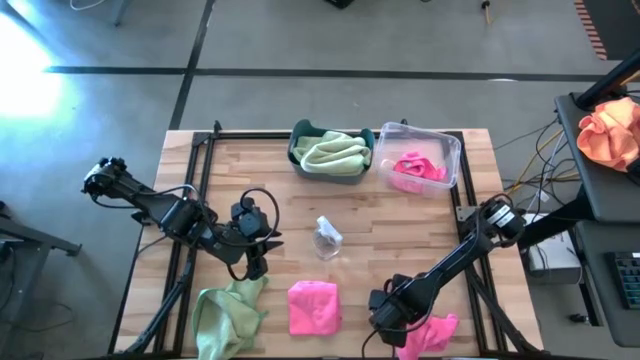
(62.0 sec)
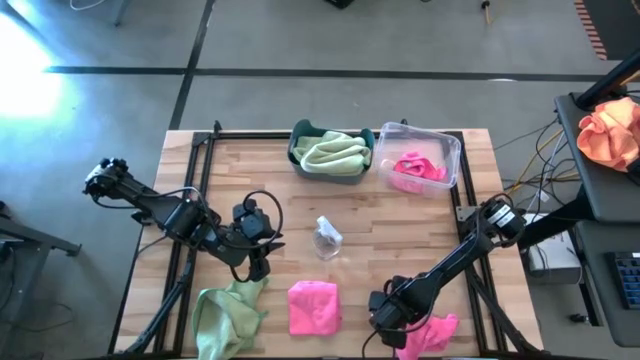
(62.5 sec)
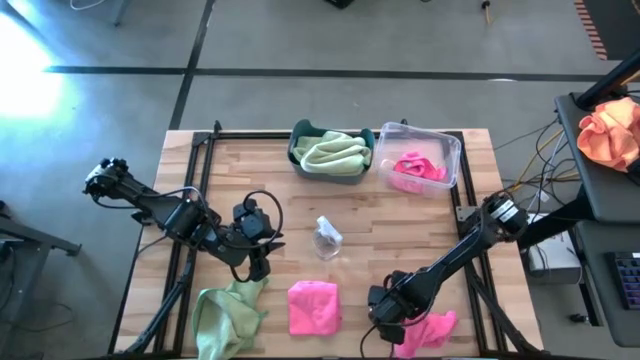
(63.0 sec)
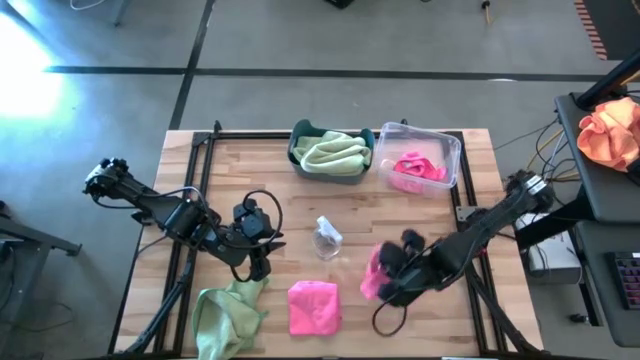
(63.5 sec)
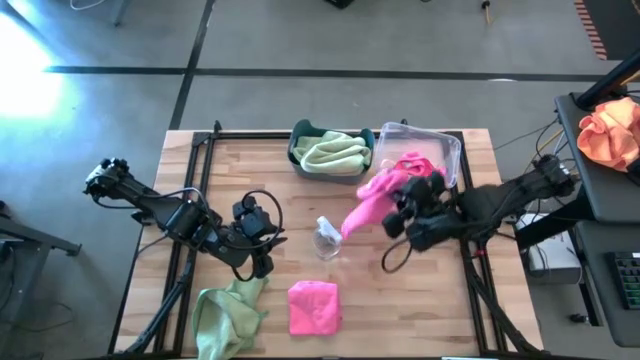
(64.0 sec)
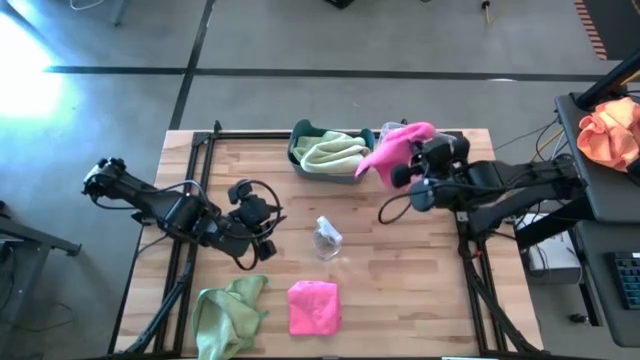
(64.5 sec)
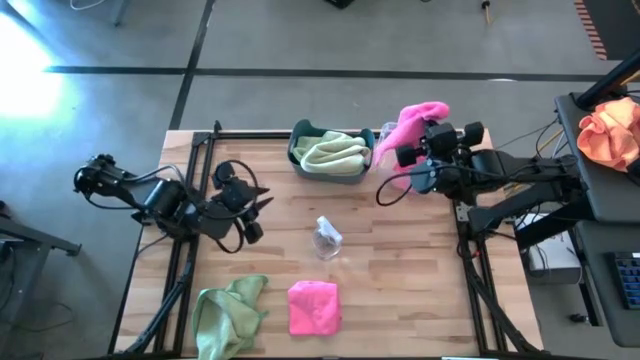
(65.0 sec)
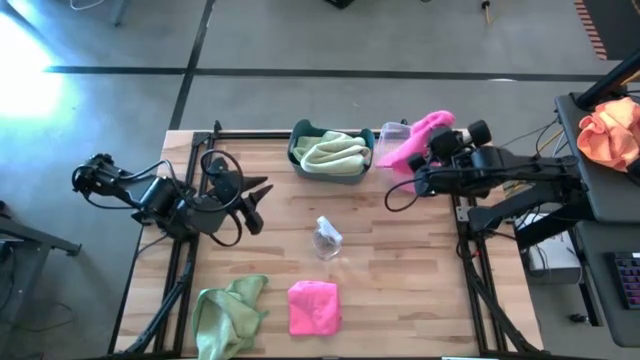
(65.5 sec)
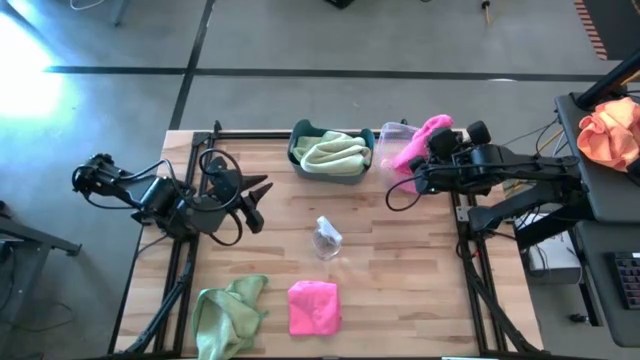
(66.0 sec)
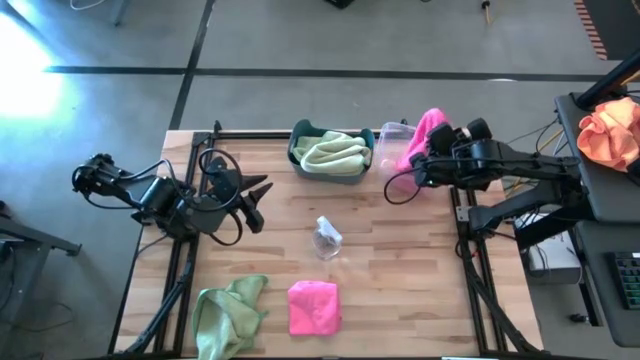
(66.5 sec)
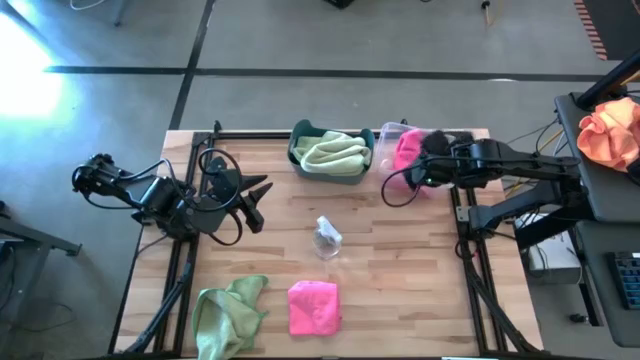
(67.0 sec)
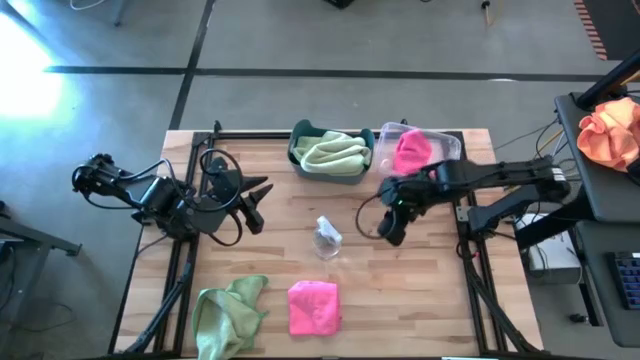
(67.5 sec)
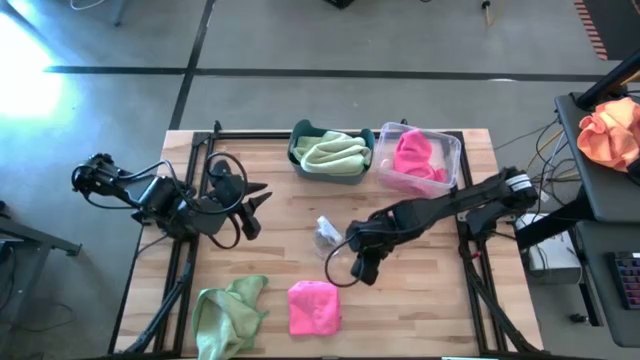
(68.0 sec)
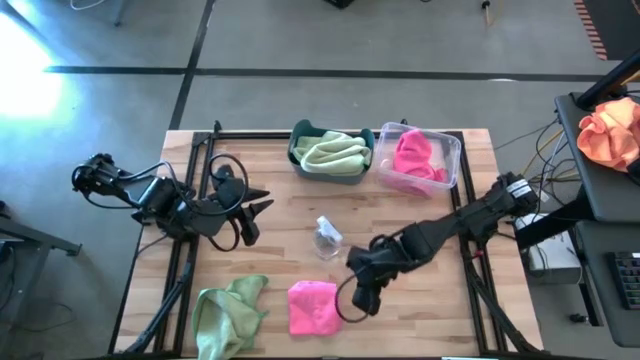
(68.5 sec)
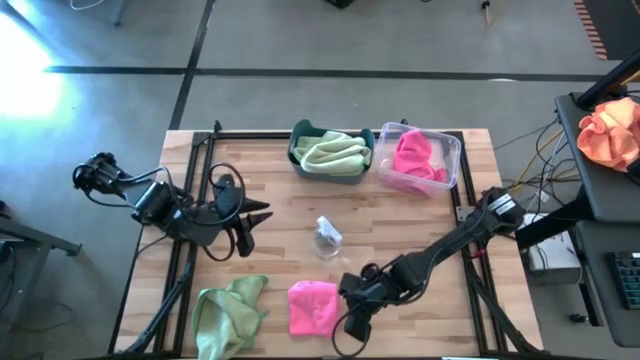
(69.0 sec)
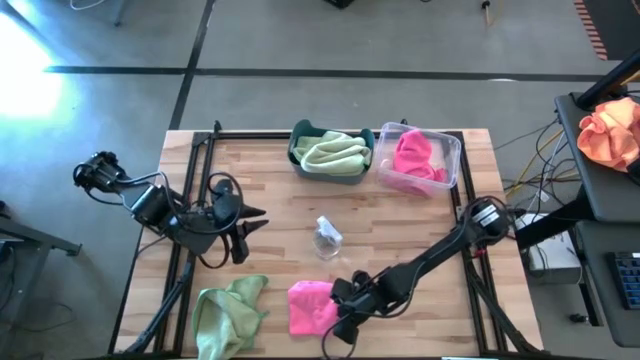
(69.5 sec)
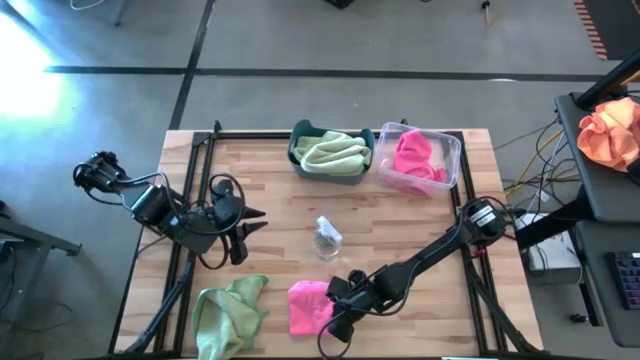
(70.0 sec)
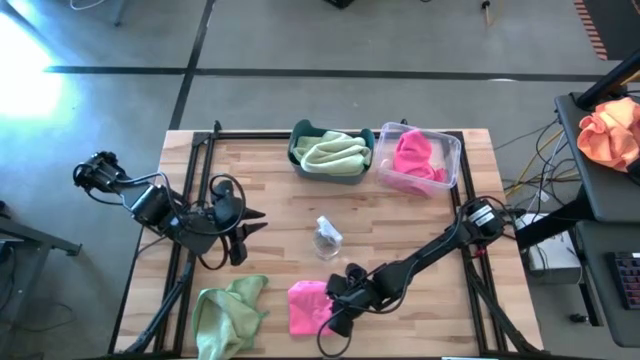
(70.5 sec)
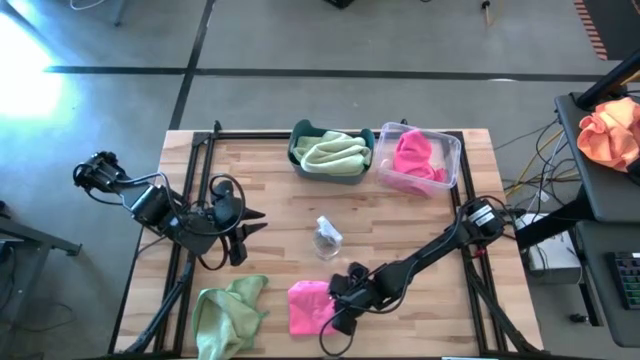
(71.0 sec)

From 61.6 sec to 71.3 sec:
Task: Sort microfiber towel by color & place in baskets
Put the right pink microfiber cloth into the transparent bin

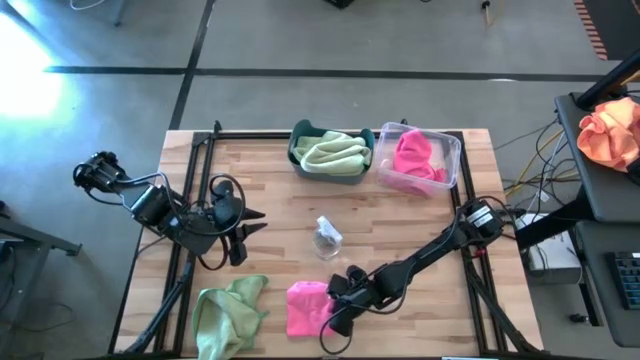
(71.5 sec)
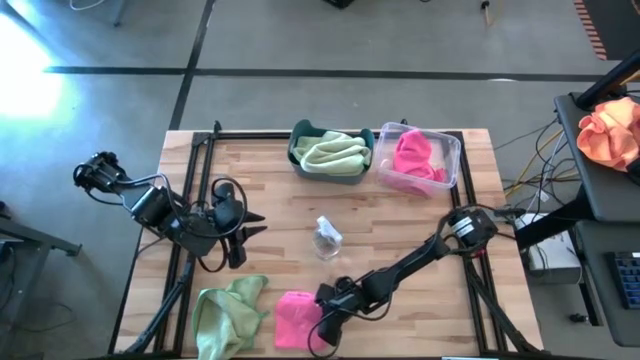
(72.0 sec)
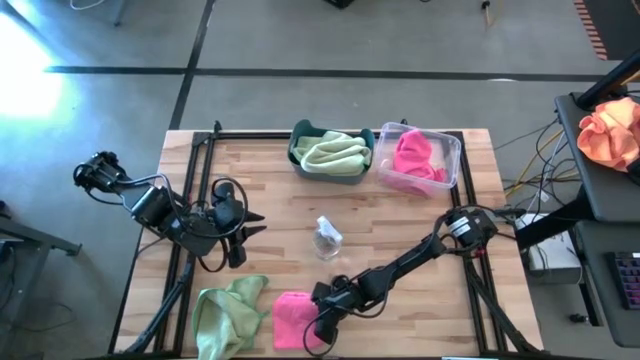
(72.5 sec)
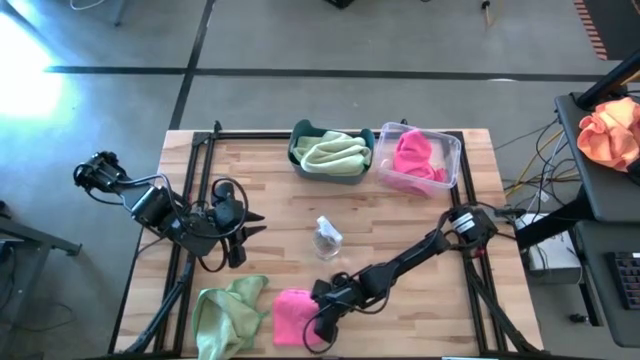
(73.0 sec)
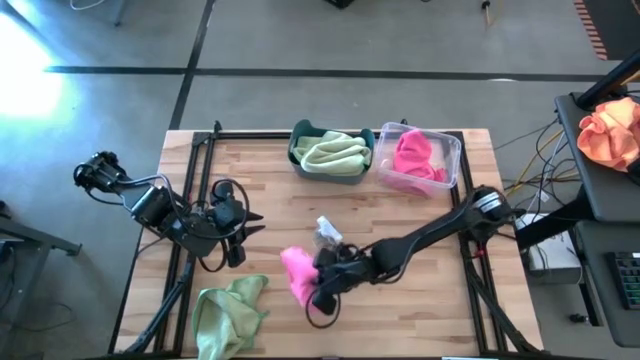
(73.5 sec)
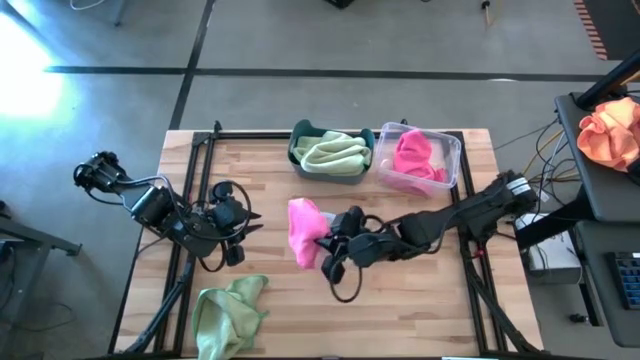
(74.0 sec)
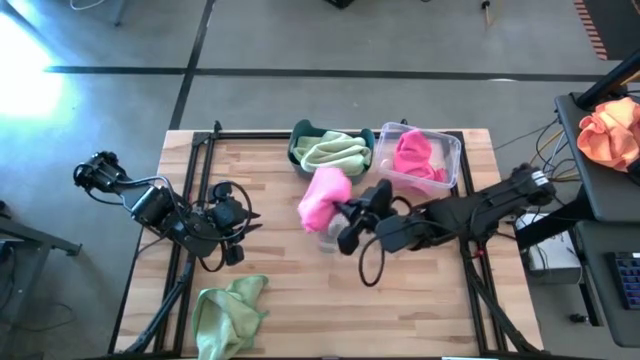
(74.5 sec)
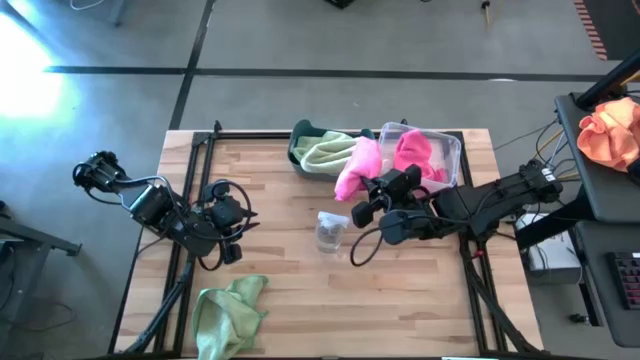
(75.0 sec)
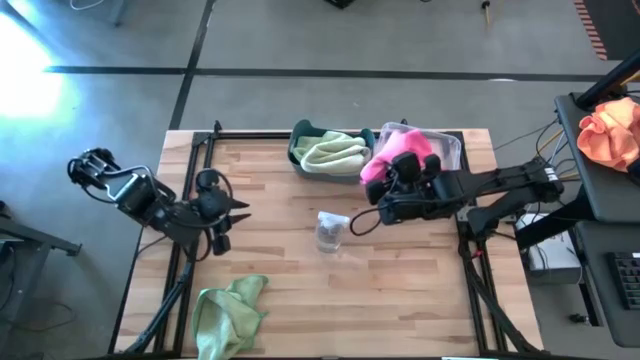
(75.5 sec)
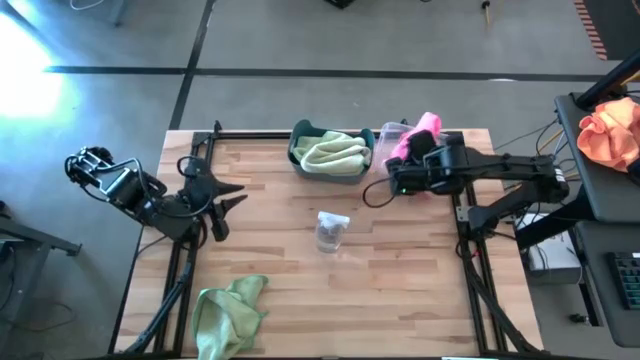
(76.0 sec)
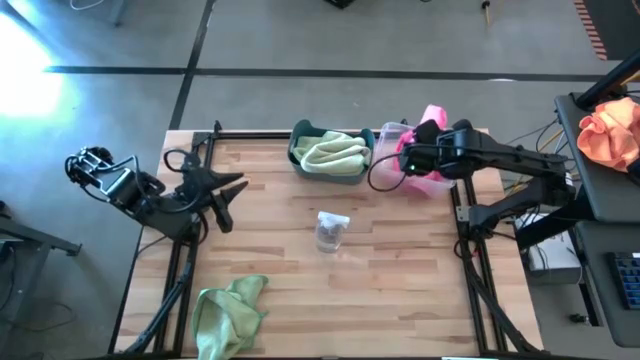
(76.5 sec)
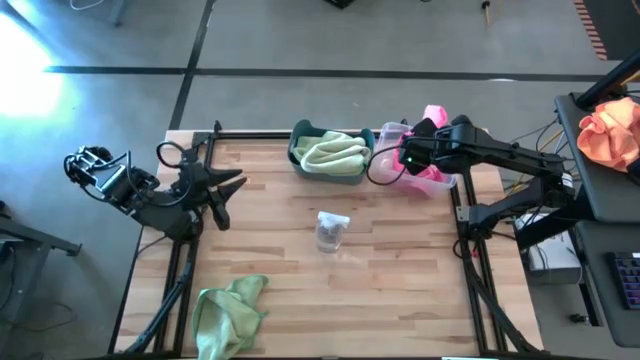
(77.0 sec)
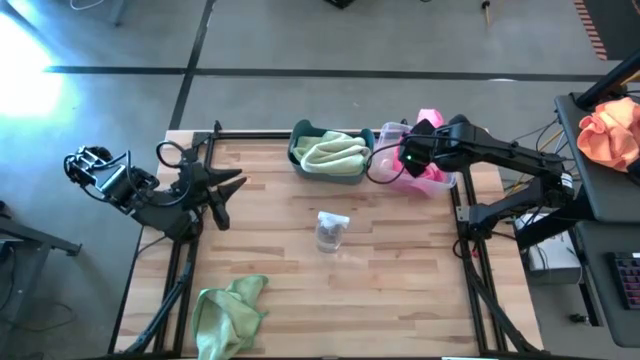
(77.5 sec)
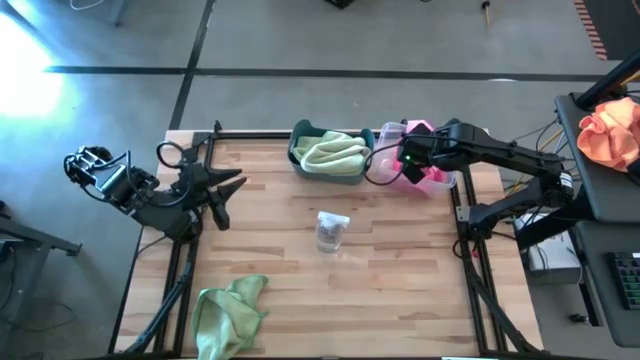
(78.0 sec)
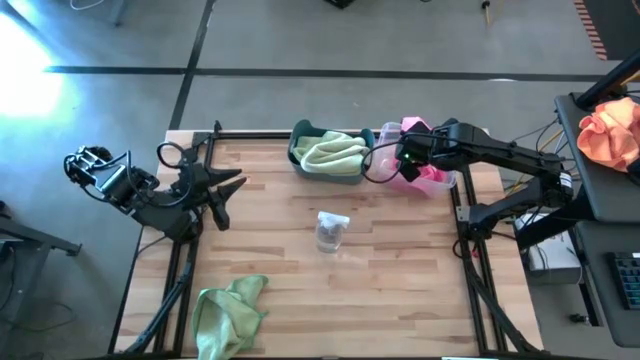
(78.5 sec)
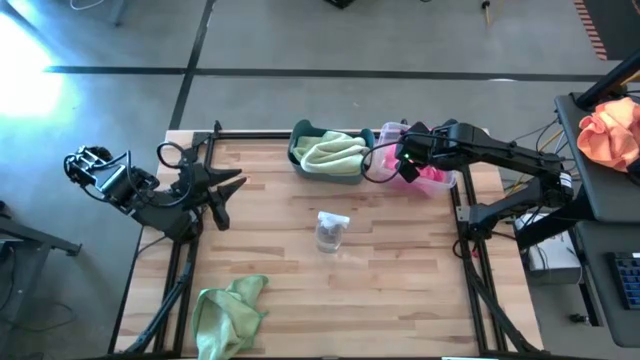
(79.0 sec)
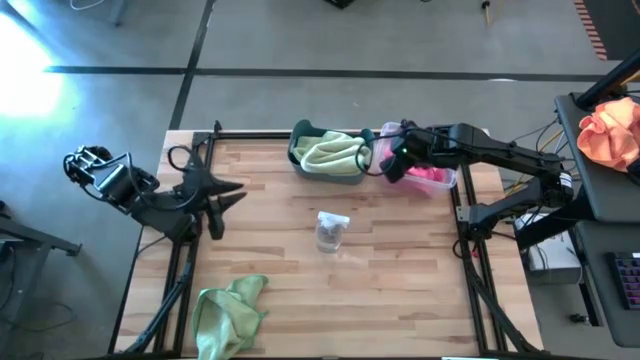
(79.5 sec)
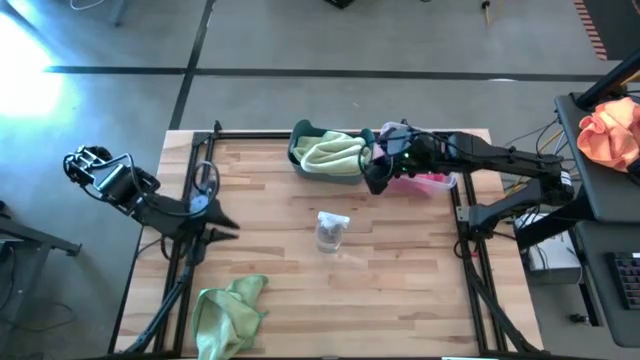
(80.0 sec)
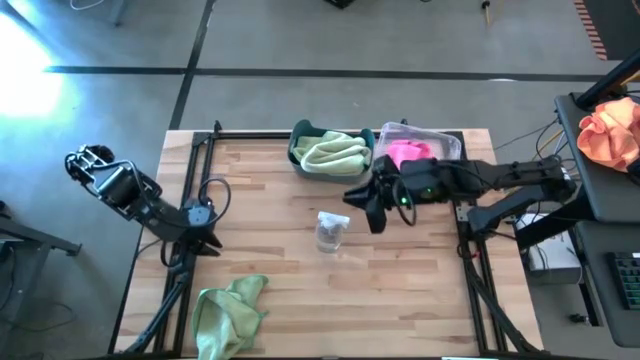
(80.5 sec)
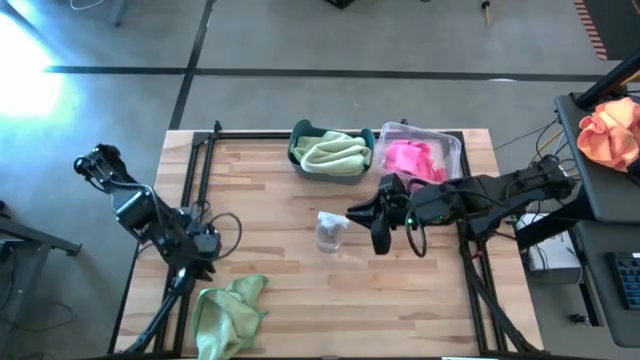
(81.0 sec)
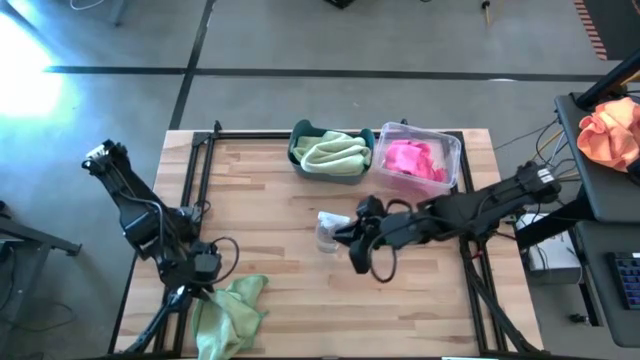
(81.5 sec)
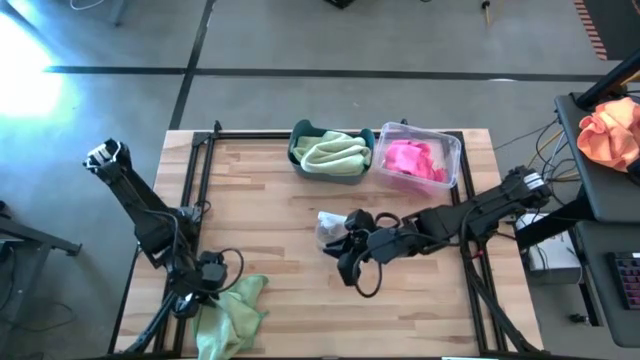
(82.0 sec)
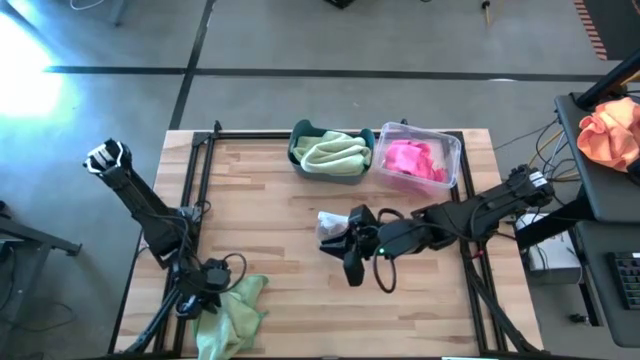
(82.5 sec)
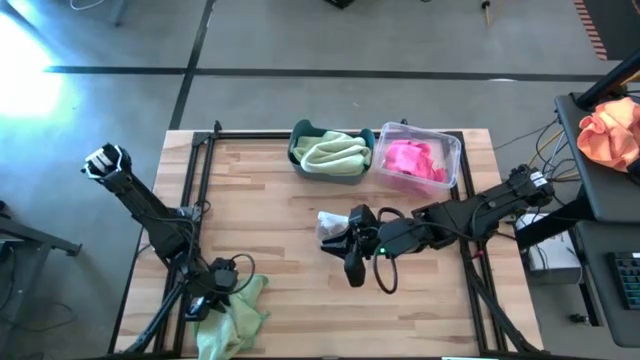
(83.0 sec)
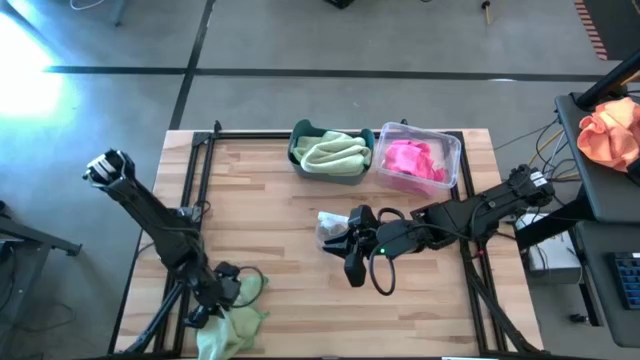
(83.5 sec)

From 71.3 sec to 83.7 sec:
Put the pink microfiber cloth into the transparent bin
